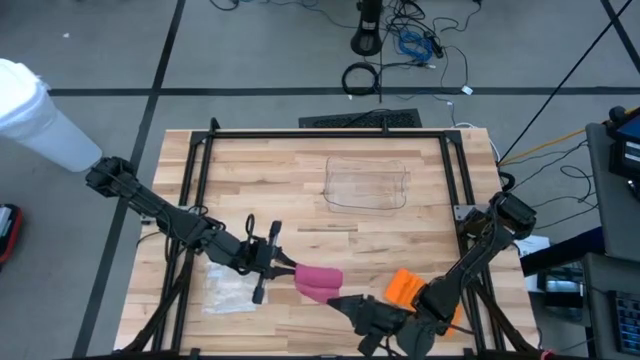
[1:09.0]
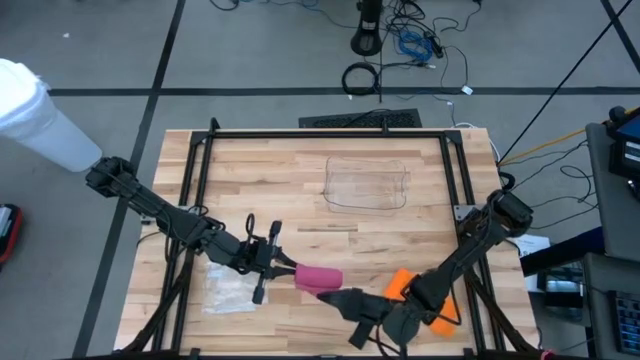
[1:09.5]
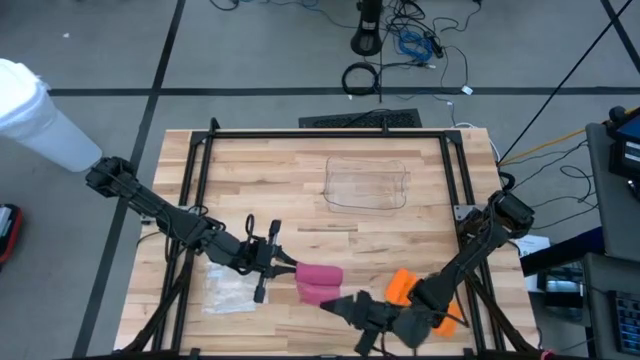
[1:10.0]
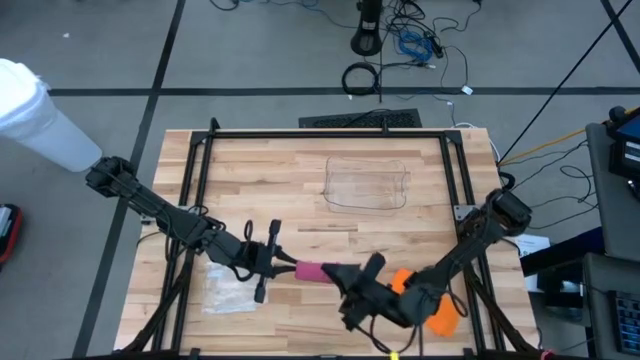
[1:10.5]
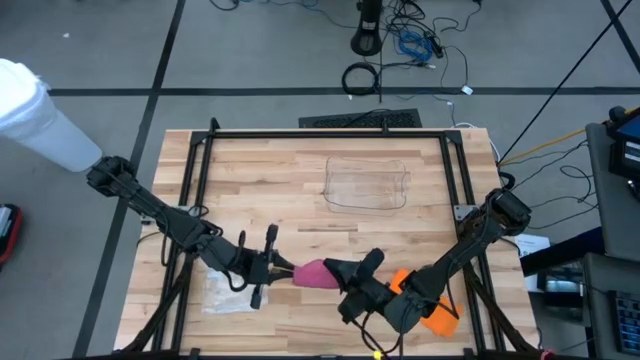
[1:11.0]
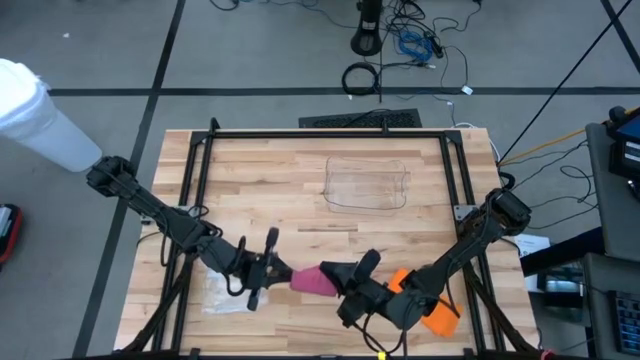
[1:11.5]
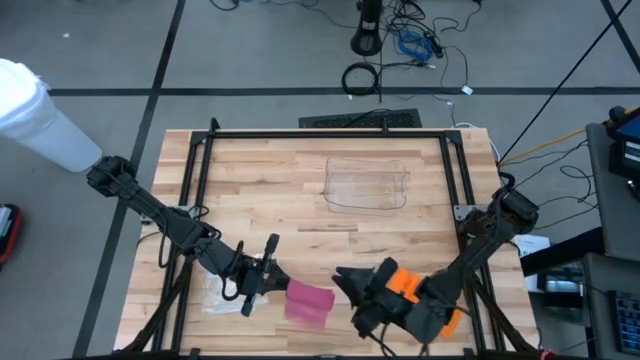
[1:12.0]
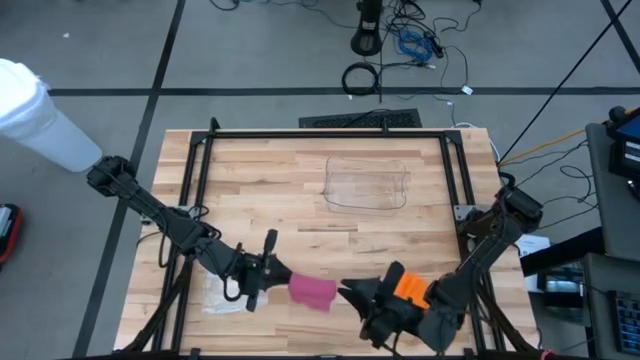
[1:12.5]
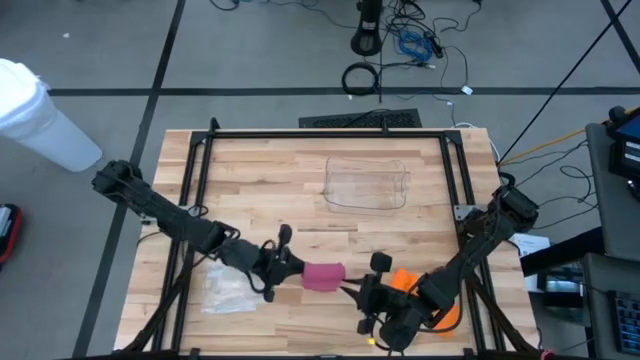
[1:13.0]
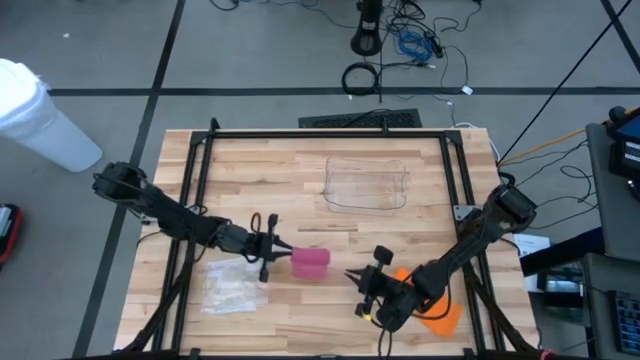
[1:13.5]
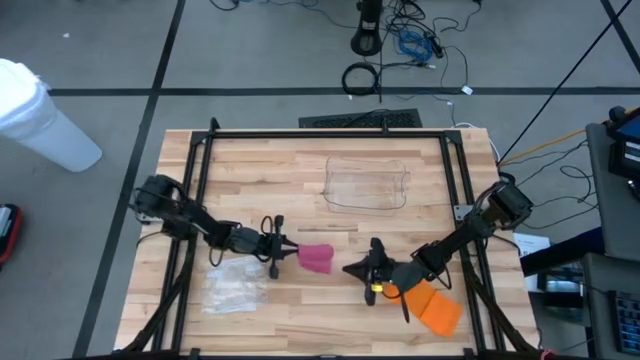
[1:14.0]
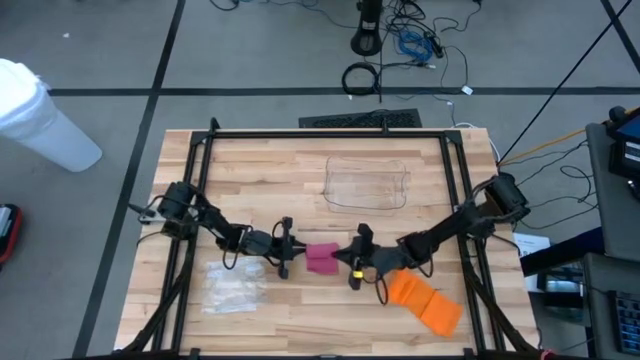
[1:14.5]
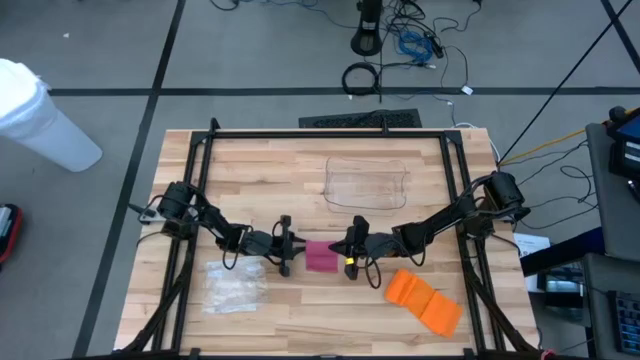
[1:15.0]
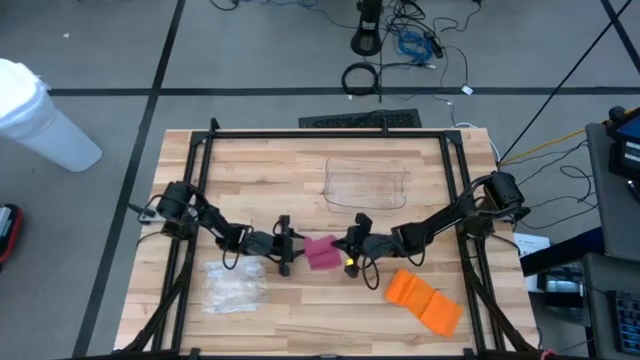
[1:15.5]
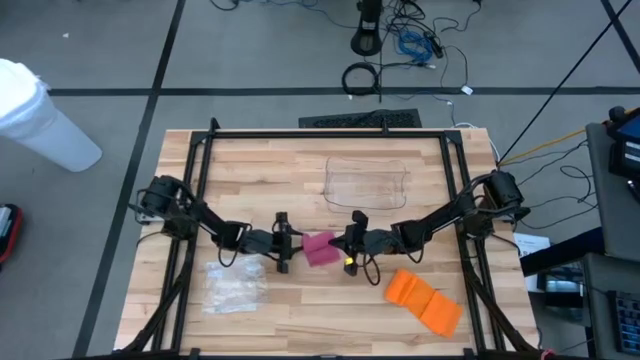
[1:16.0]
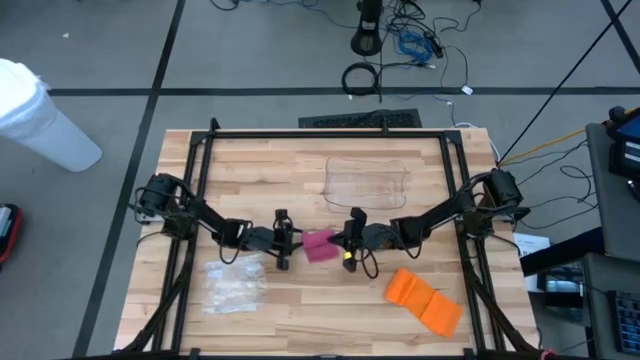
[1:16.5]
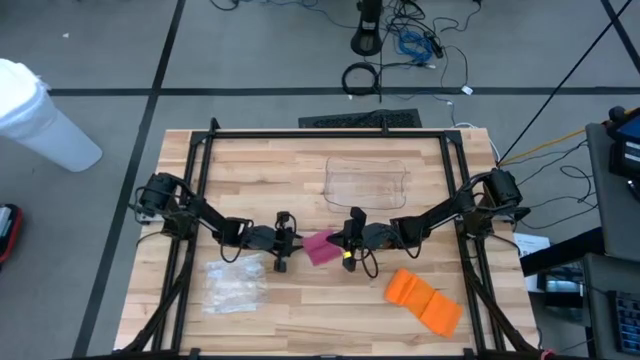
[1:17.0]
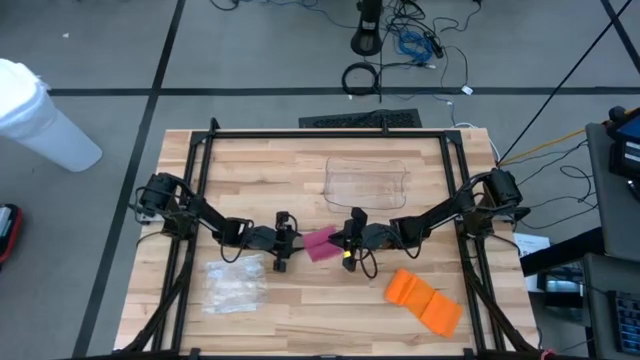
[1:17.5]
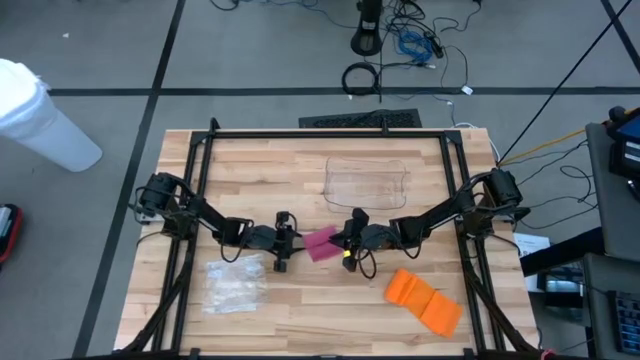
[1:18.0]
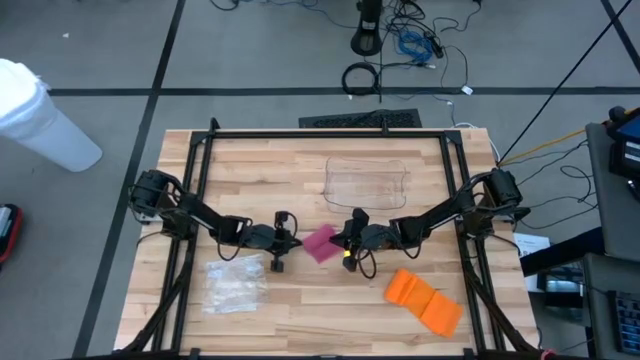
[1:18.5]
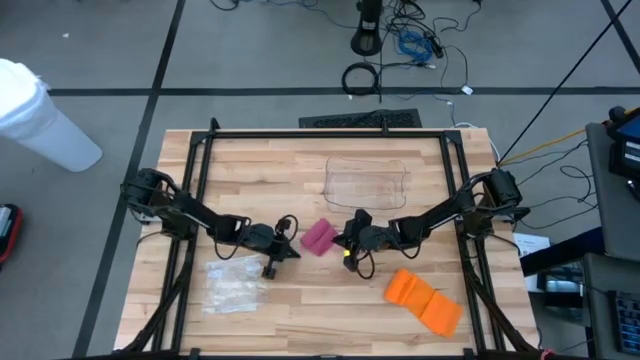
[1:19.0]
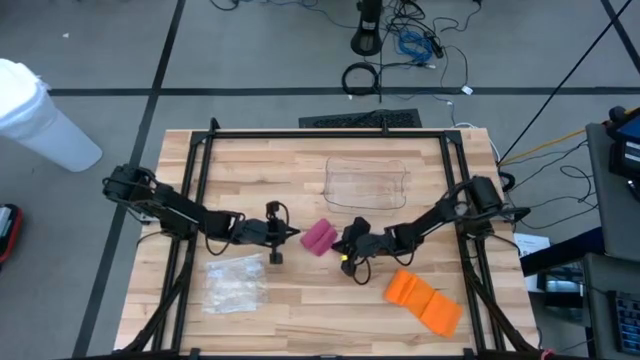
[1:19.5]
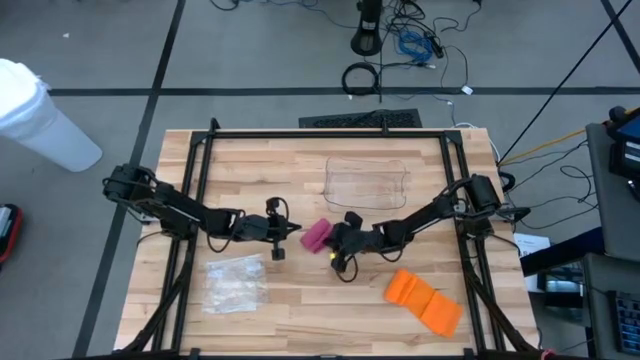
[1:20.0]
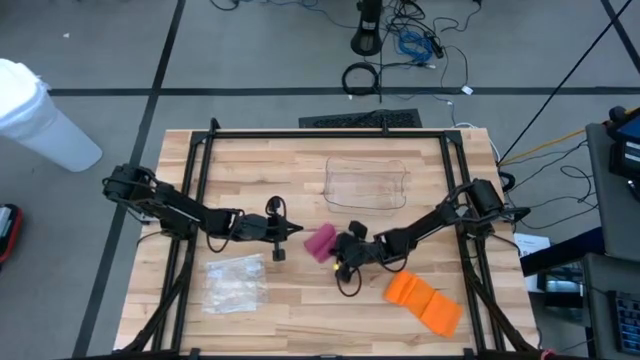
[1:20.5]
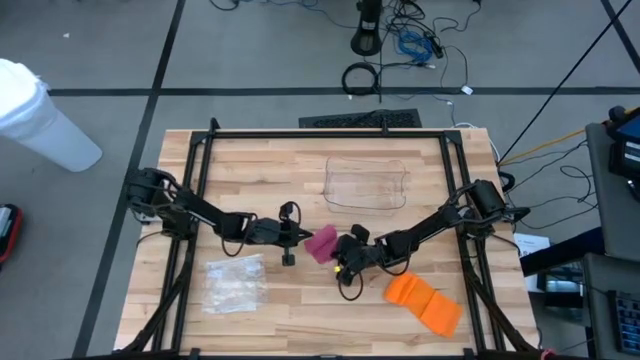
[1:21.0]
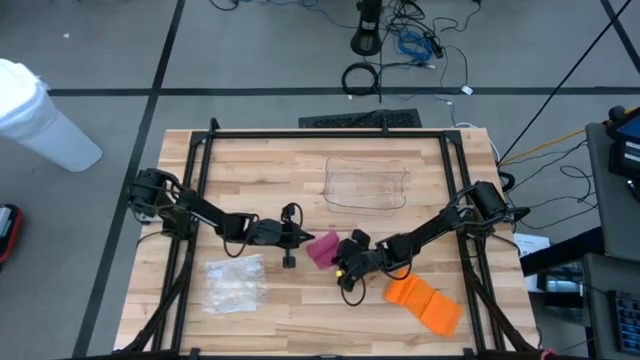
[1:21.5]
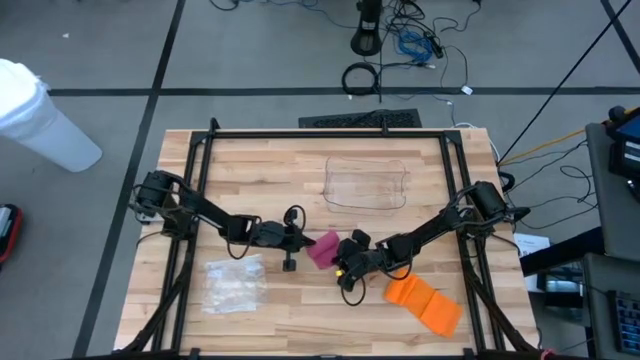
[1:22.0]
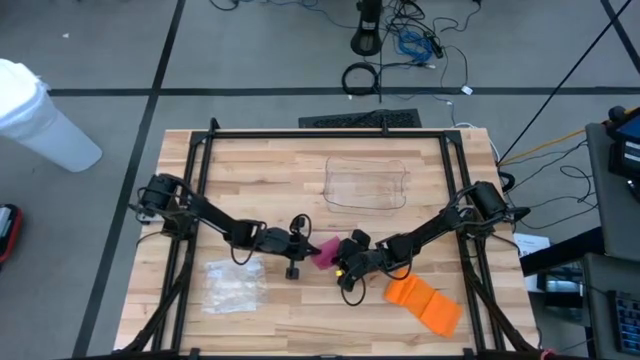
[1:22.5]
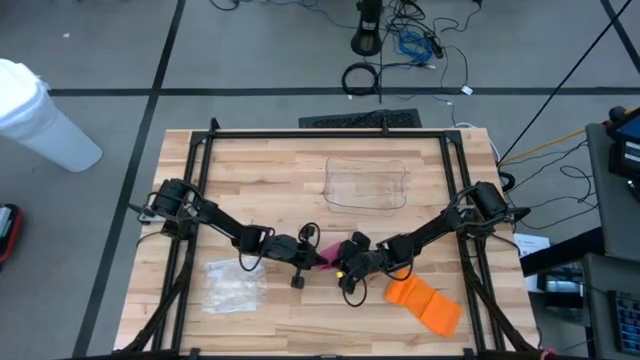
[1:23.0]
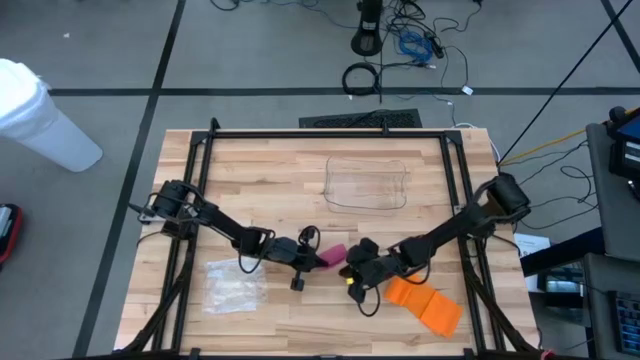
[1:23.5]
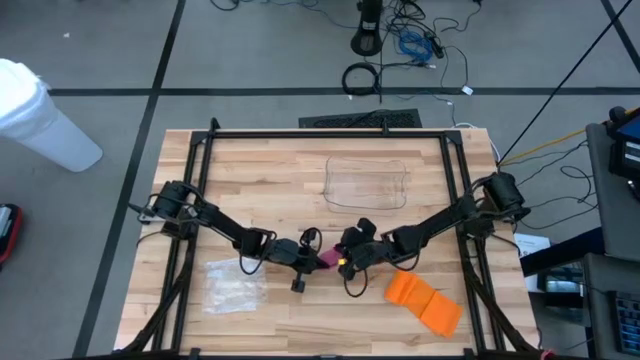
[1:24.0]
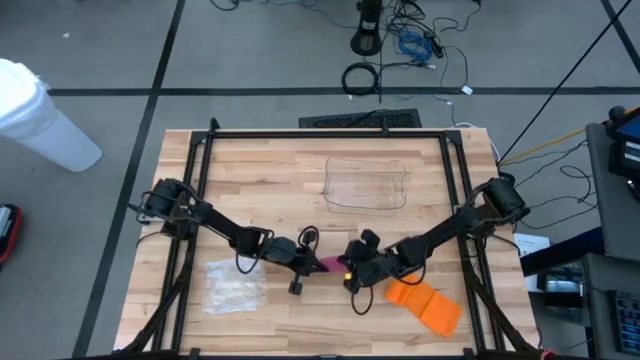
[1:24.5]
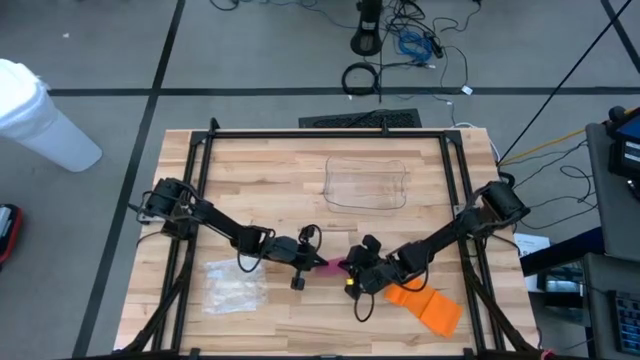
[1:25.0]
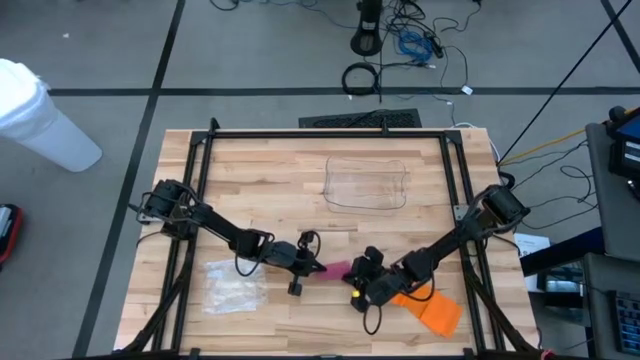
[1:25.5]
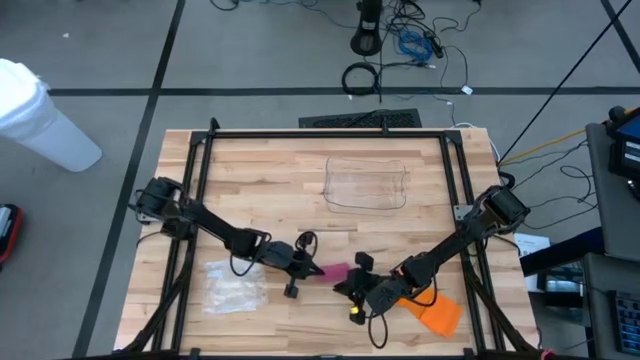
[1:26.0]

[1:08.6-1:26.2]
Task: Roll bandage
Roll the pink bandage

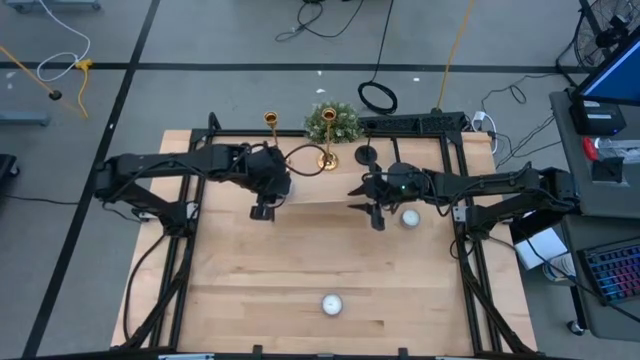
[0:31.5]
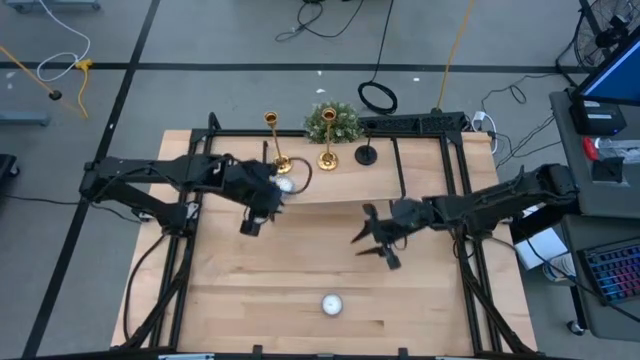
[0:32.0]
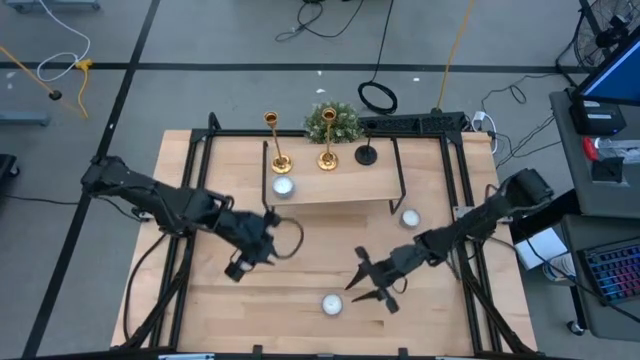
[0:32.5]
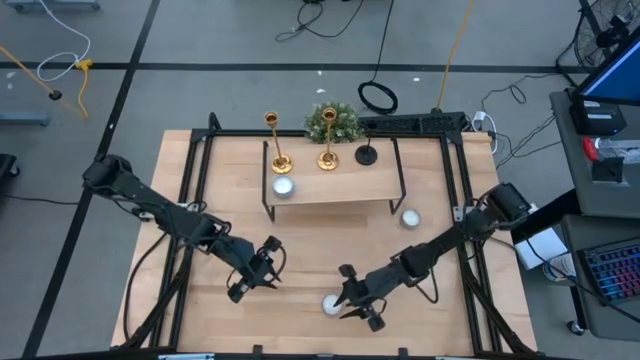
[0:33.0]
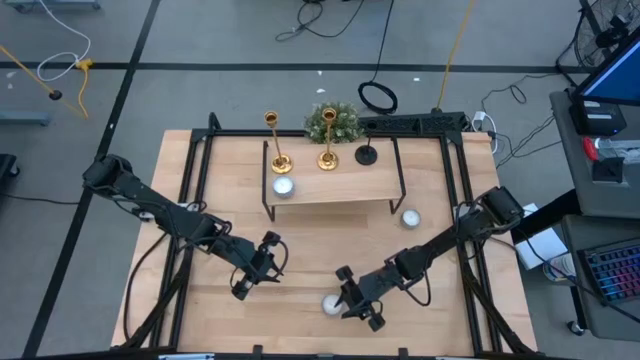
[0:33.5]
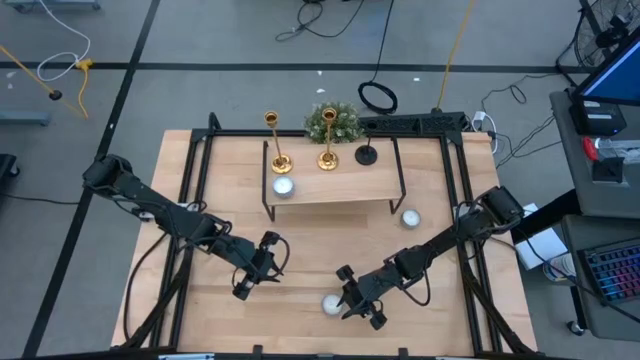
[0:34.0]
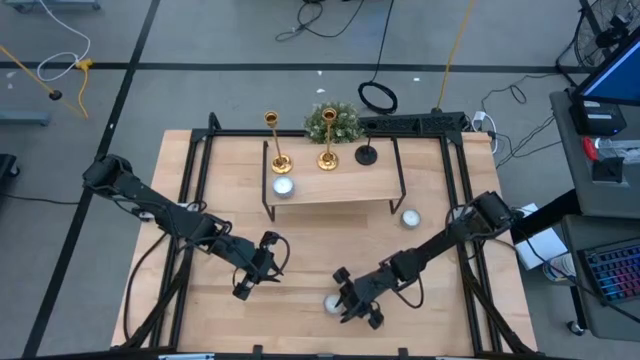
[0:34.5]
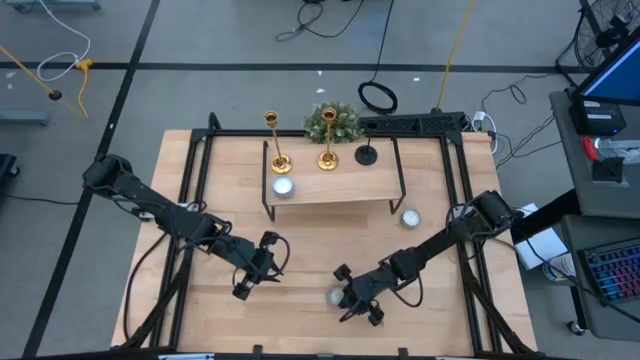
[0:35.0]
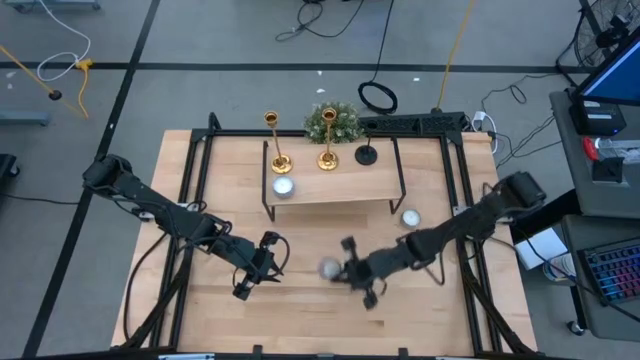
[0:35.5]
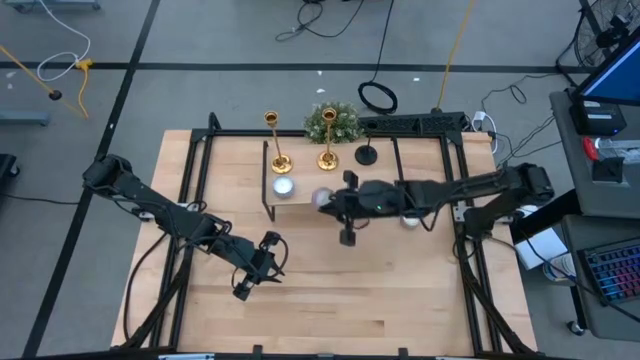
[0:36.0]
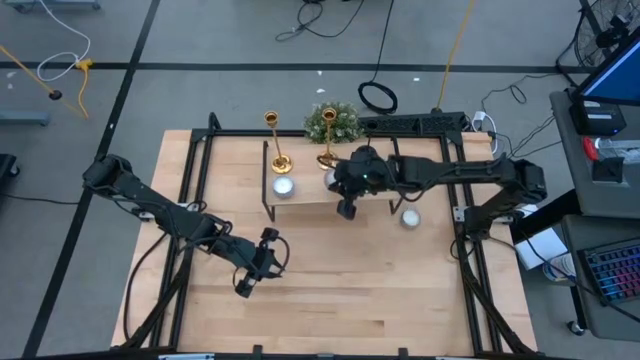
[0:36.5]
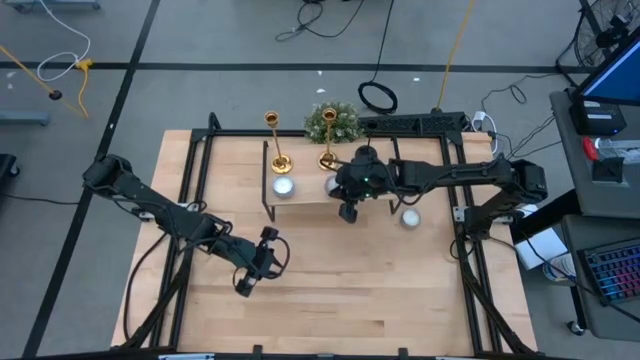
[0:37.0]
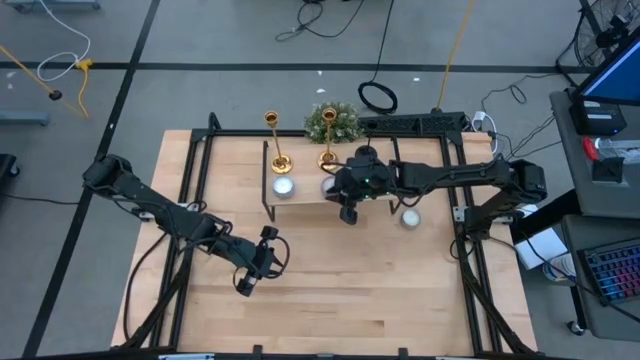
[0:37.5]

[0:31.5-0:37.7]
Task: Pick & Place candle stick holders
Align the pink scented candle with the white scented candle on the shelf
